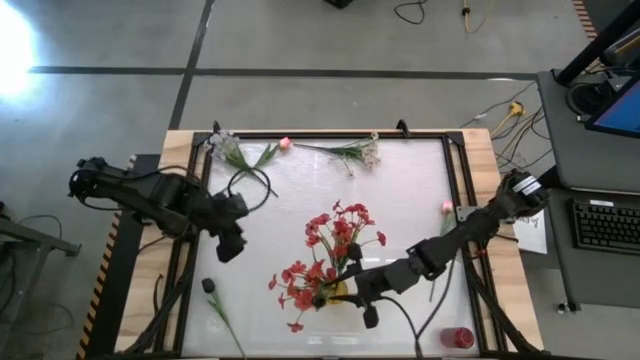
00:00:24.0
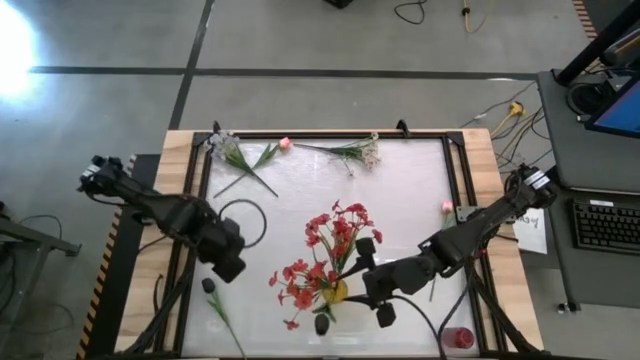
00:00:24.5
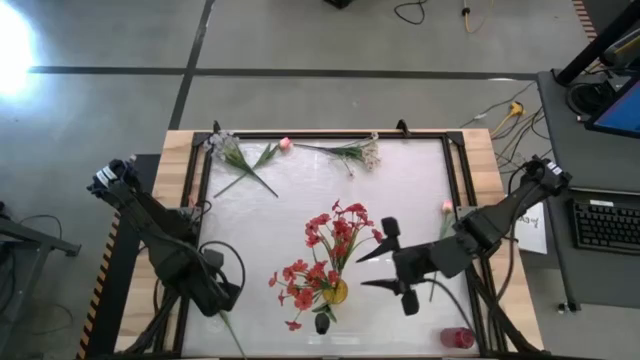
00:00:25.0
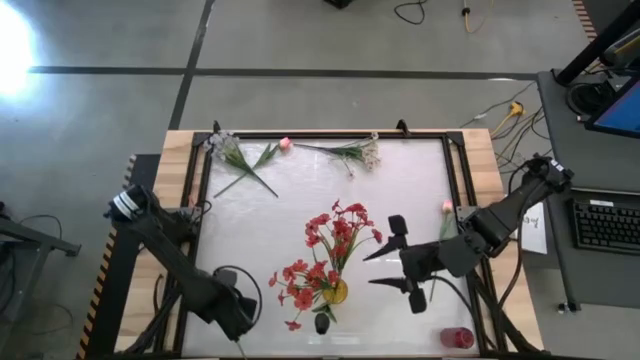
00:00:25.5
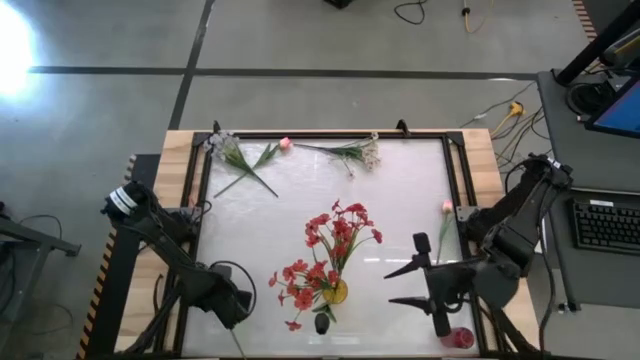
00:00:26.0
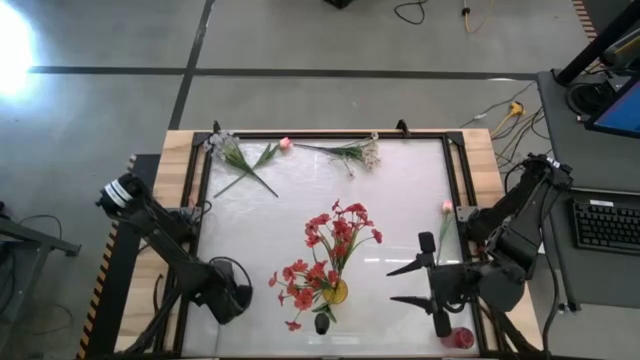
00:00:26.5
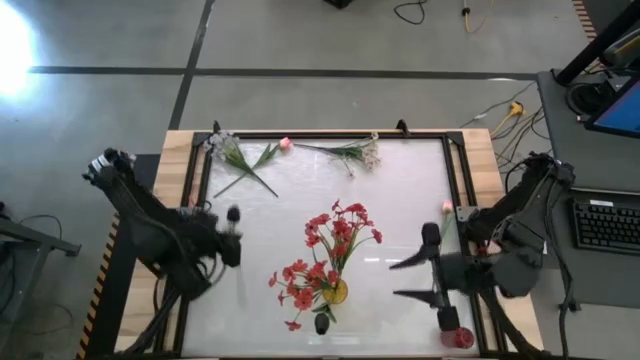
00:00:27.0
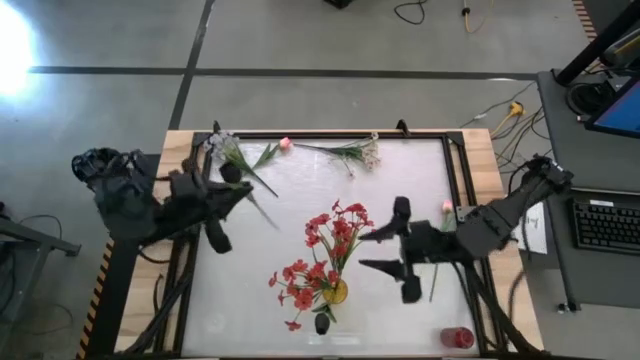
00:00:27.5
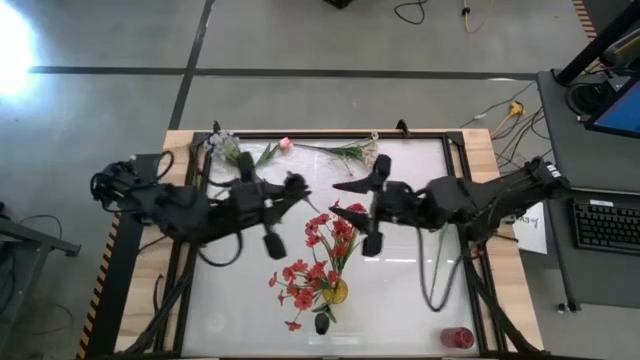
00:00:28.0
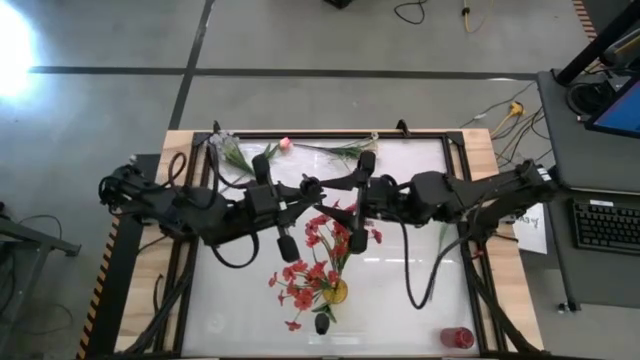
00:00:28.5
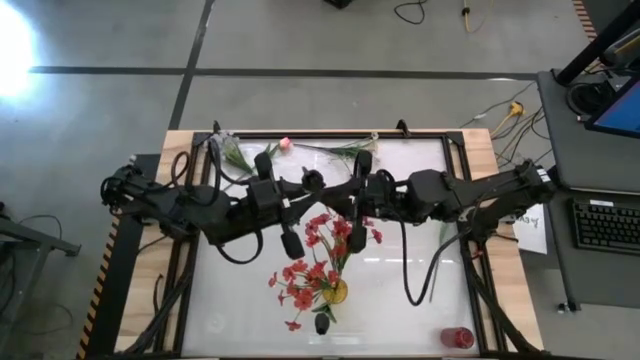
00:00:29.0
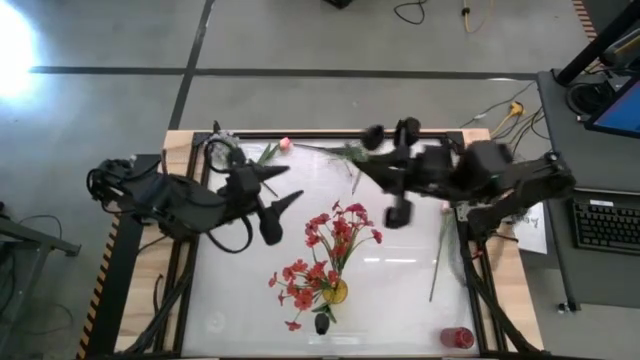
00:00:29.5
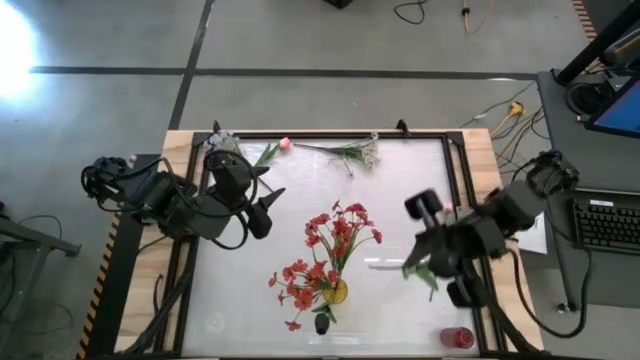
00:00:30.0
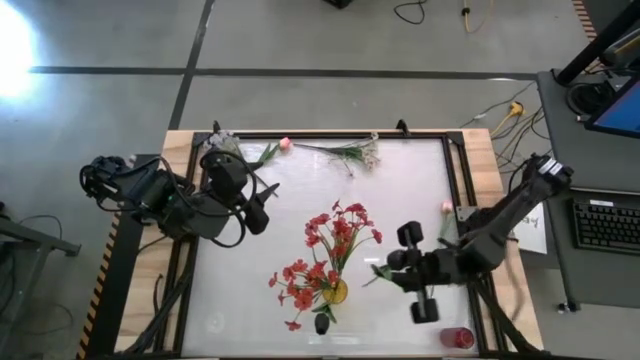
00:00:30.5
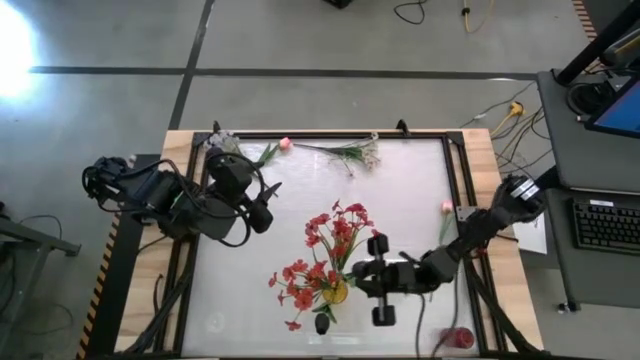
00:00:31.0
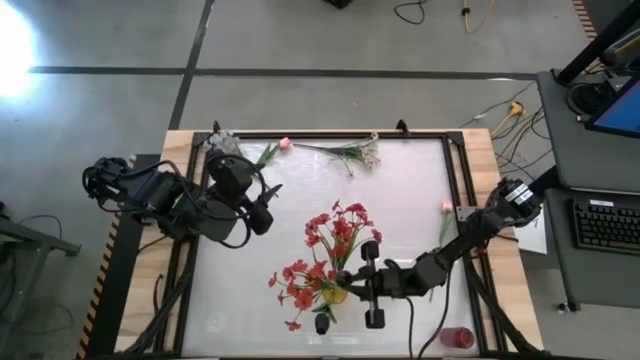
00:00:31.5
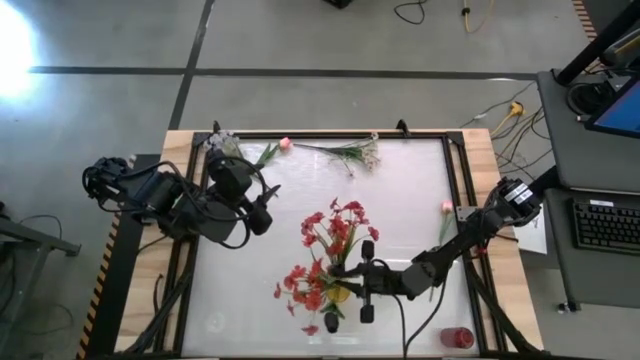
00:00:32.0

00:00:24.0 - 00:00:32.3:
Task: Sort flowers into vase by color
Put the black tulip into the yellow vase

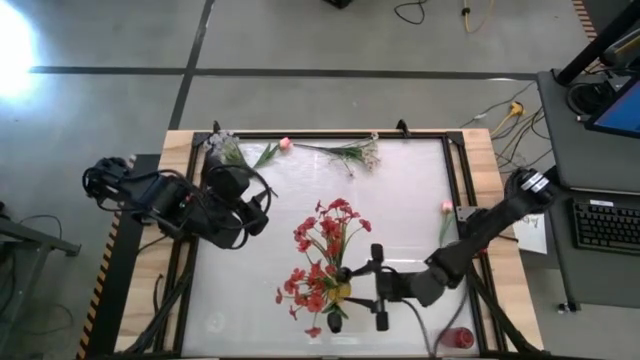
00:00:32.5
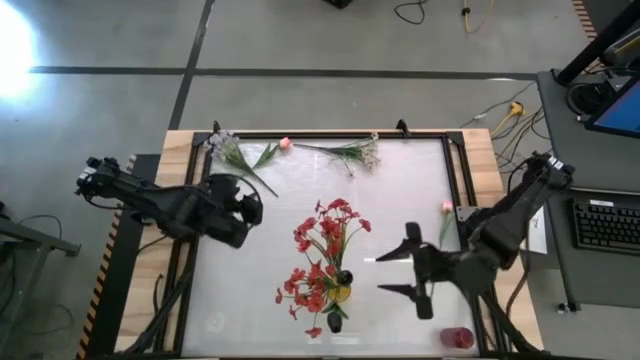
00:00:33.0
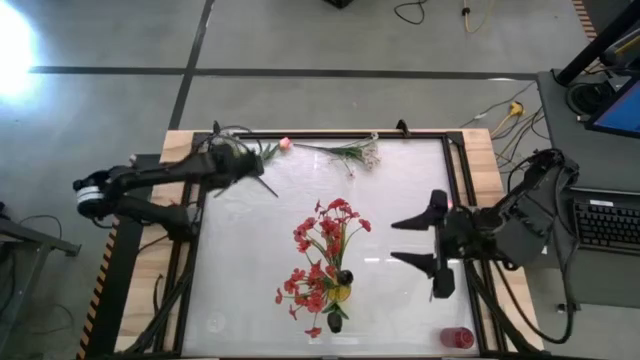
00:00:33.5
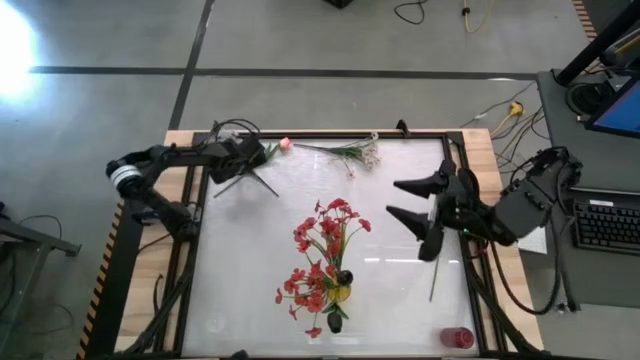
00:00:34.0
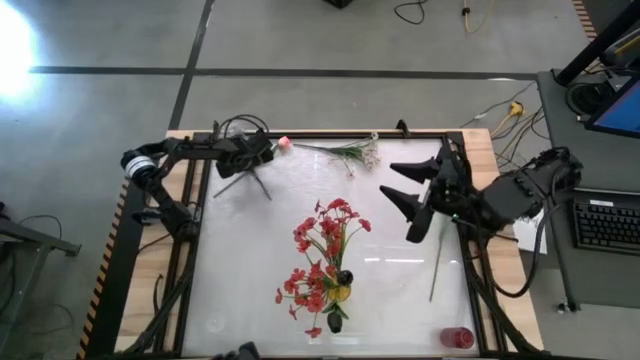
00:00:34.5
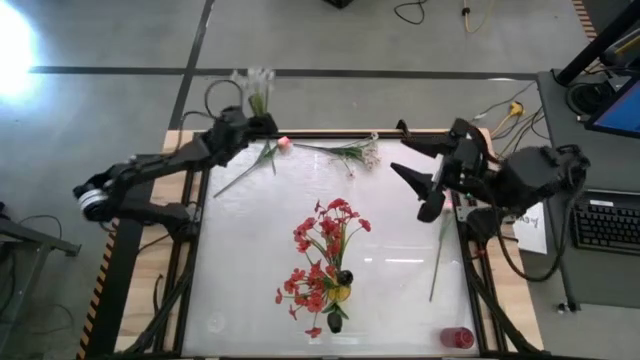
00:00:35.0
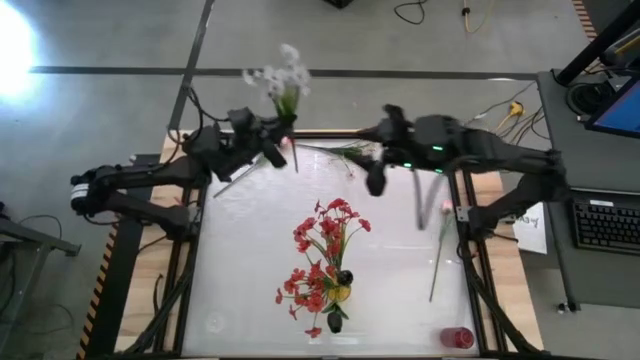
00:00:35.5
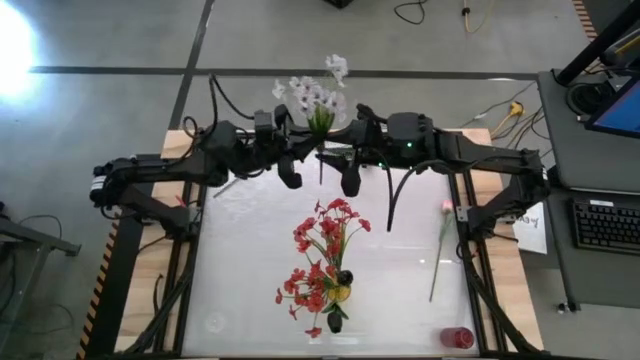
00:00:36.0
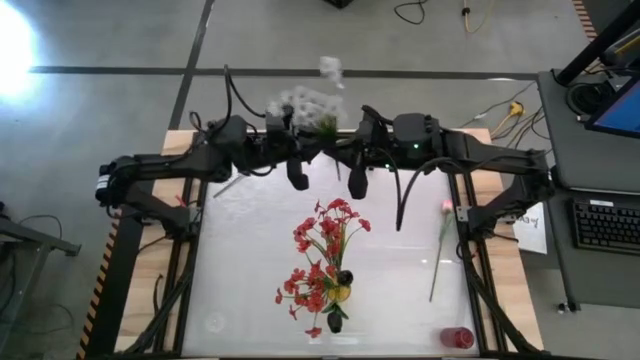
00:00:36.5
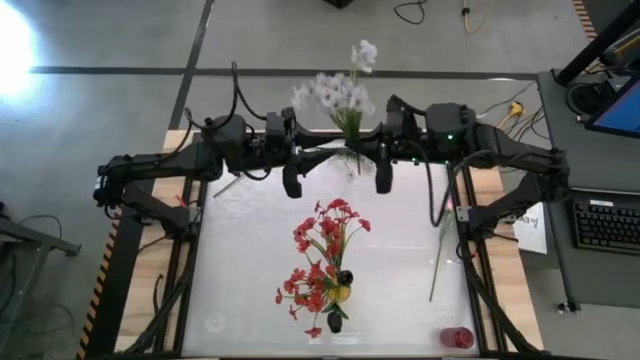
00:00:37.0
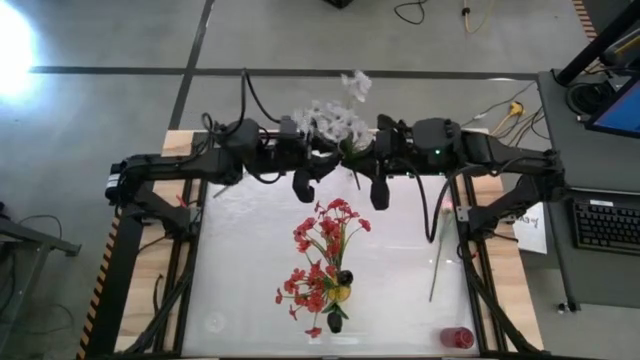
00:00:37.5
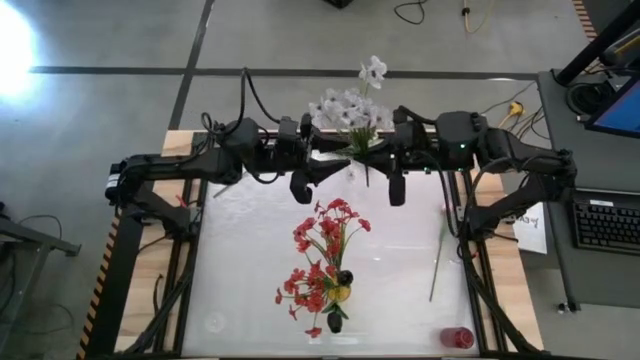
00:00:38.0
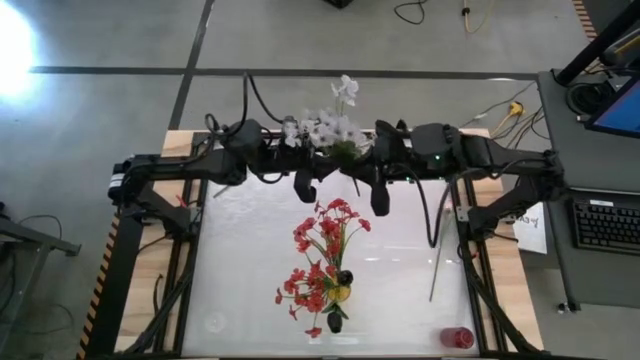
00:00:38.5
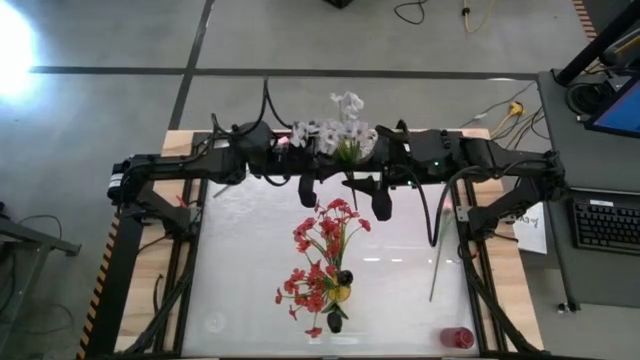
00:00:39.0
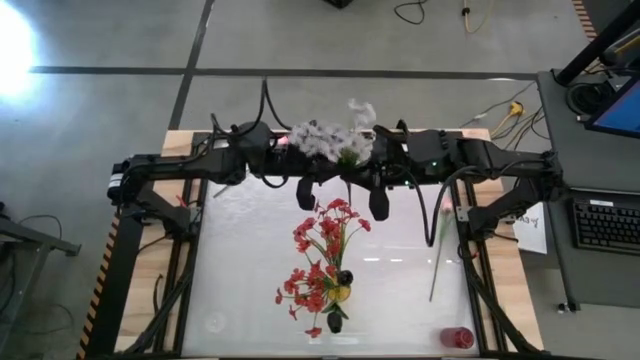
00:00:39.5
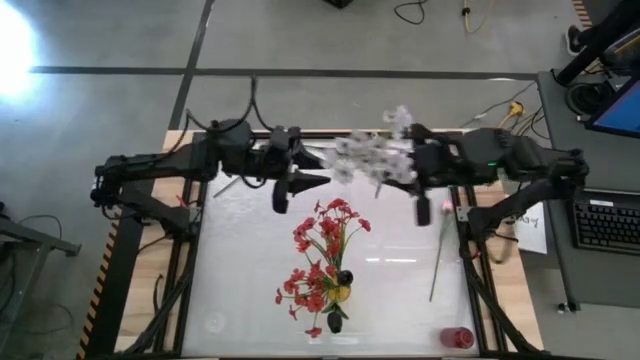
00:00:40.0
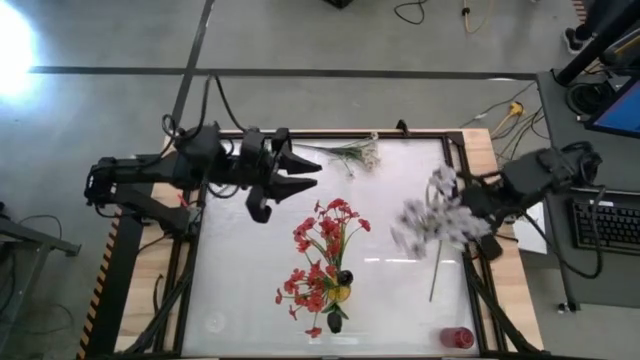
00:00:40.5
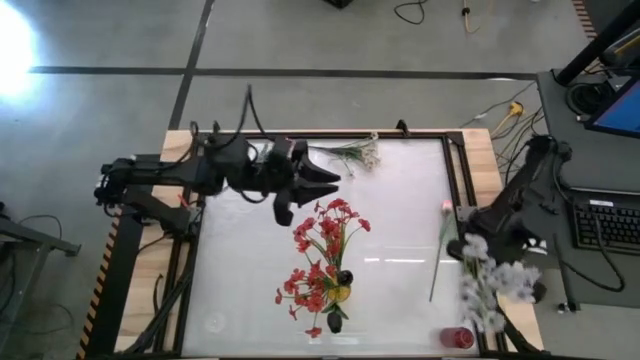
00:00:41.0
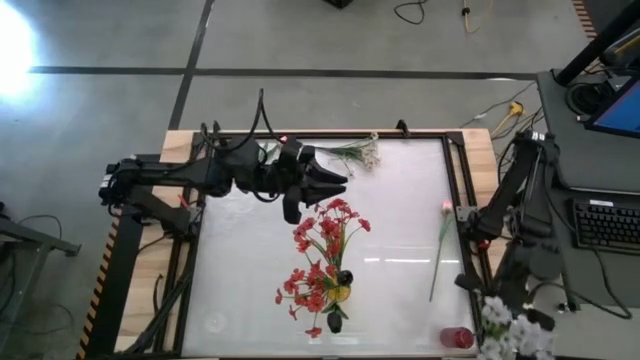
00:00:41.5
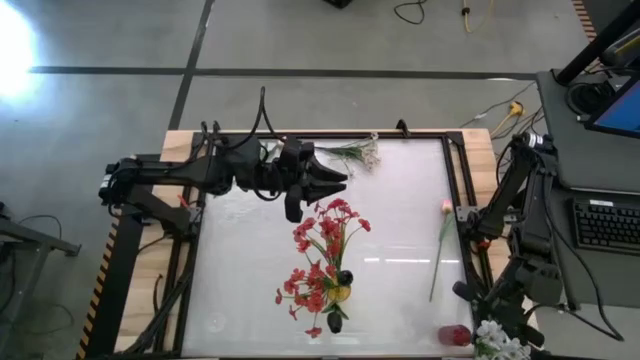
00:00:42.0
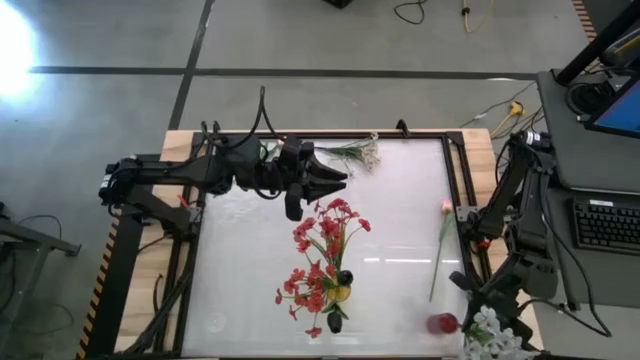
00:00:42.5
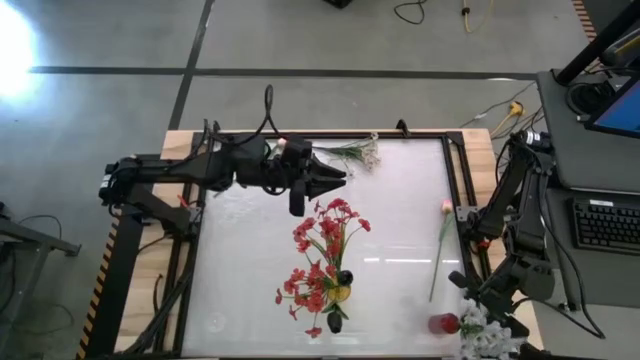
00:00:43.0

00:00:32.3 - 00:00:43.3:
Put the left white flowers into the red vase

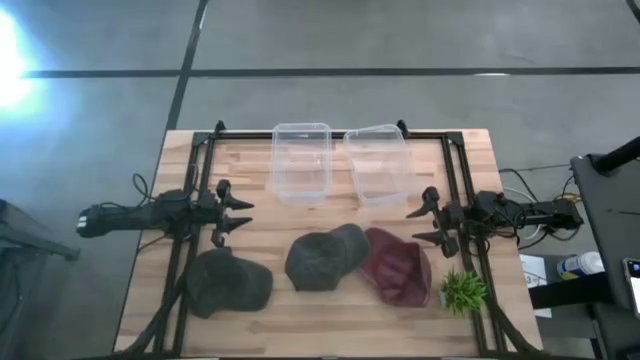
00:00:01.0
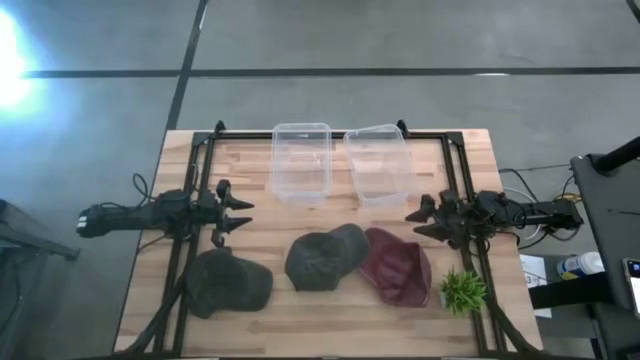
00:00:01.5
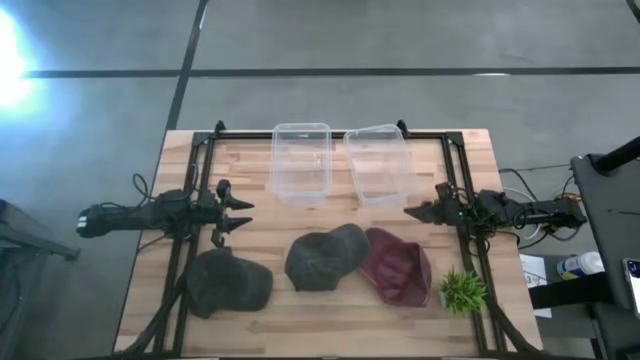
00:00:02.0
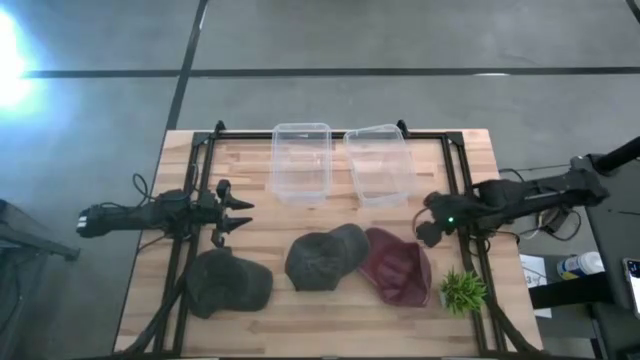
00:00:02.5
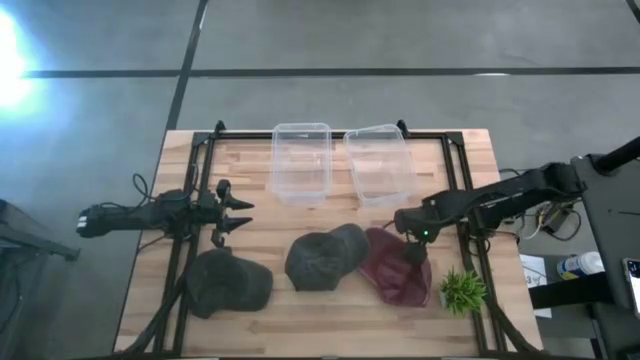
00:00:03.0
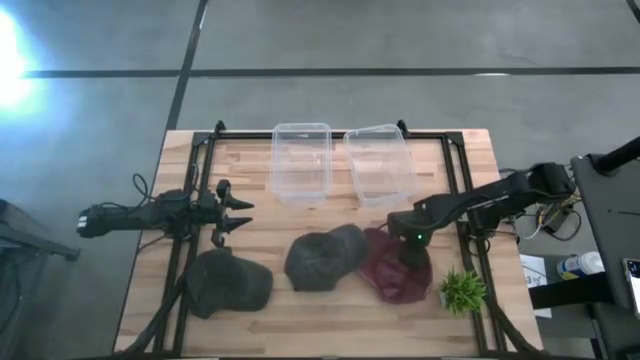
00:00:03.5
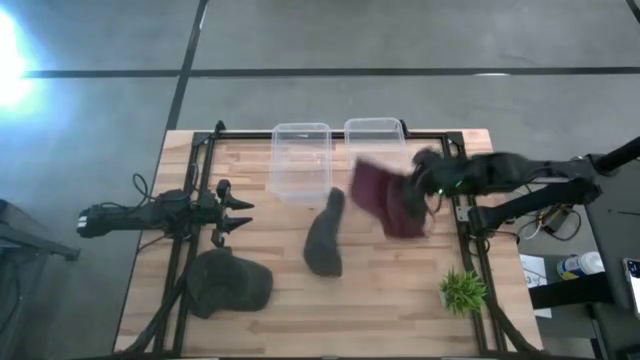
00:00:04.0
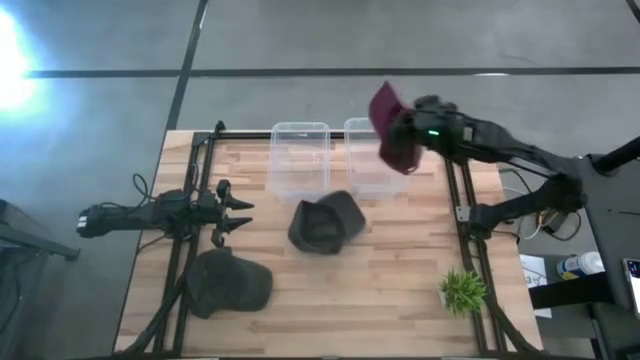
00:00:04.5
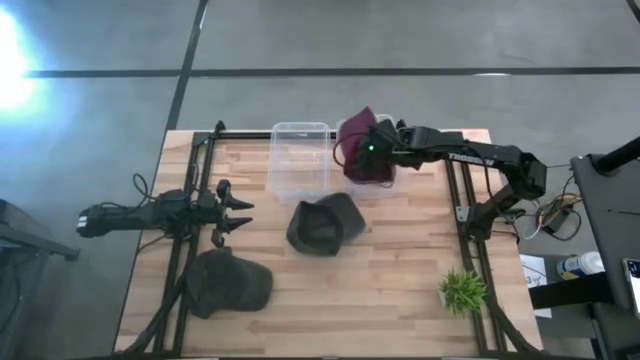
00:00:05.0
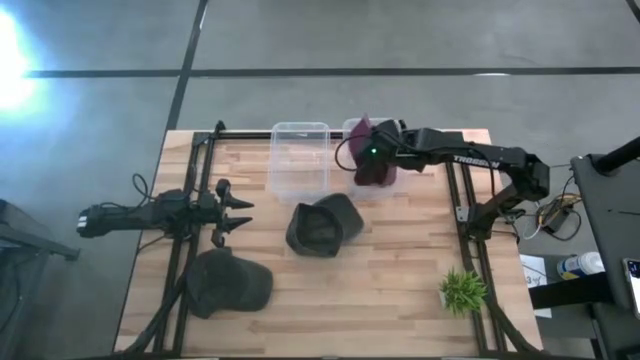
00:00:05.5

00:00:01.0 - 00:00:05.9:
Task: Pick & Place hat
Put the red cap in the right transparent bin
